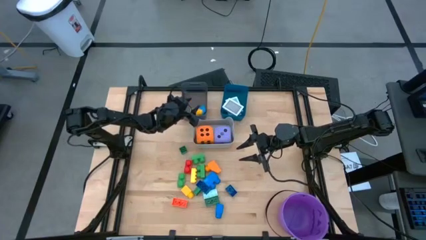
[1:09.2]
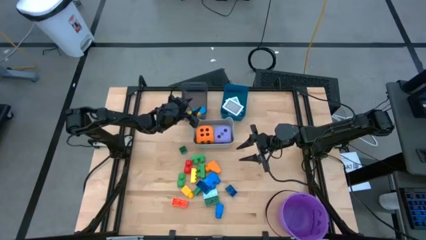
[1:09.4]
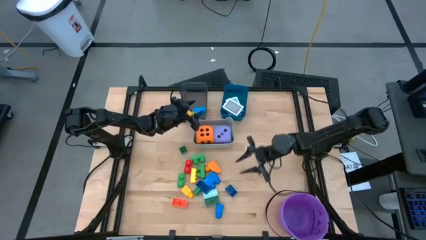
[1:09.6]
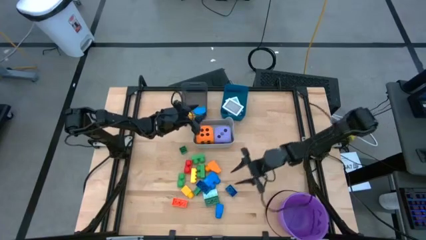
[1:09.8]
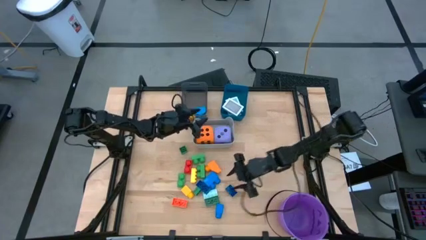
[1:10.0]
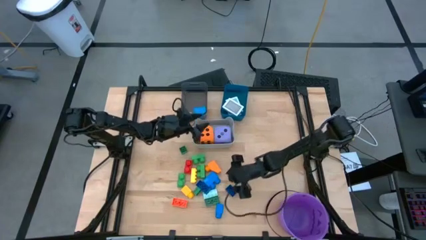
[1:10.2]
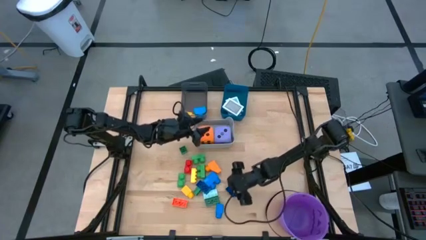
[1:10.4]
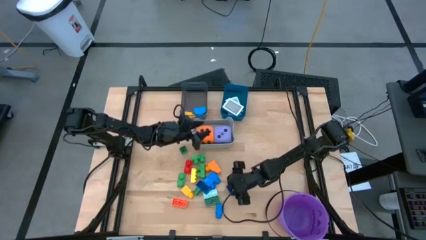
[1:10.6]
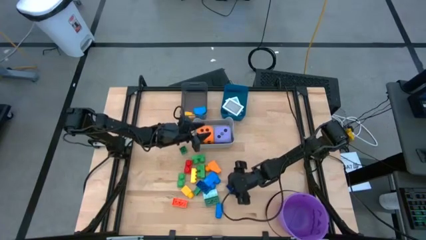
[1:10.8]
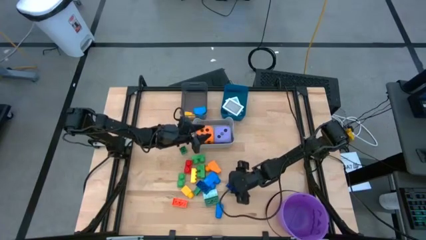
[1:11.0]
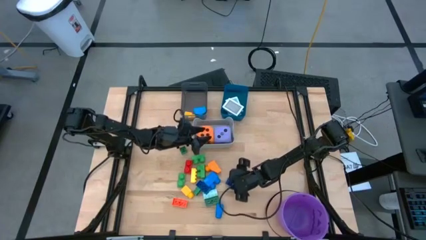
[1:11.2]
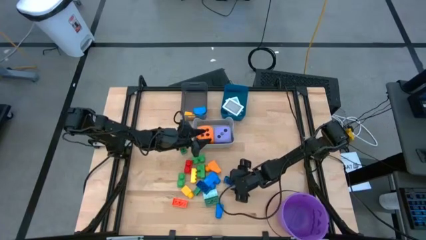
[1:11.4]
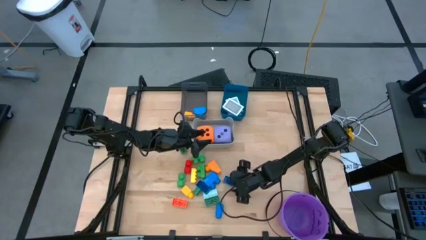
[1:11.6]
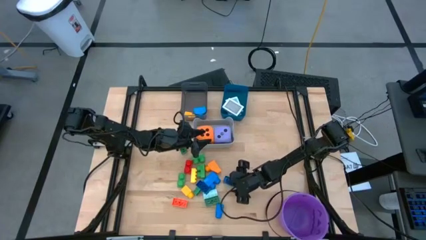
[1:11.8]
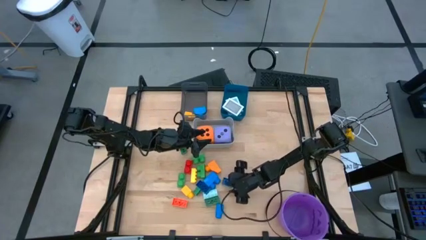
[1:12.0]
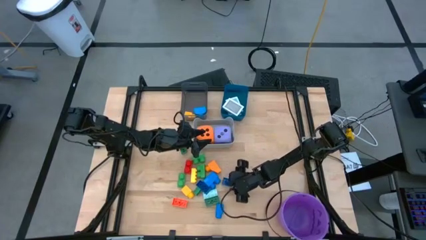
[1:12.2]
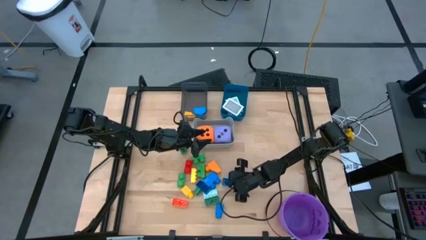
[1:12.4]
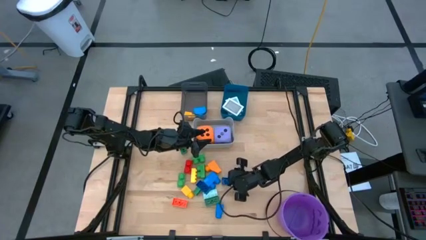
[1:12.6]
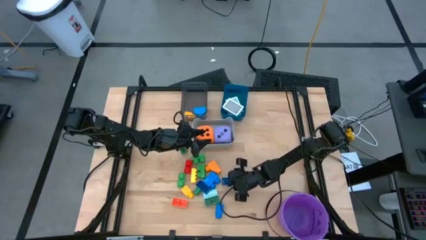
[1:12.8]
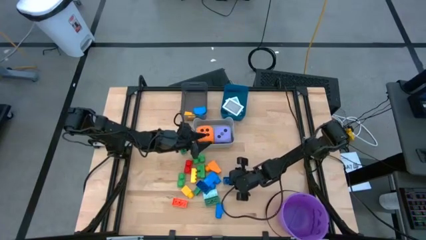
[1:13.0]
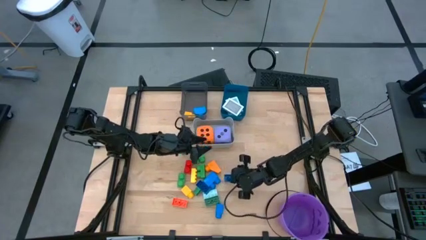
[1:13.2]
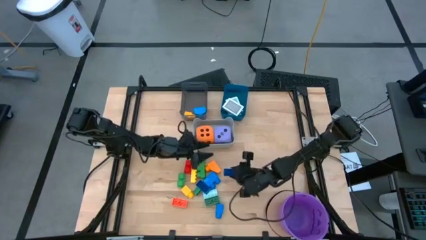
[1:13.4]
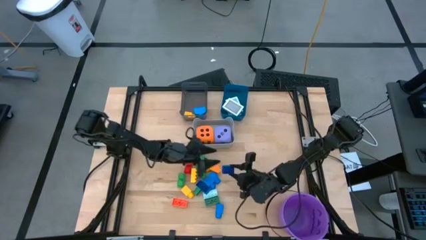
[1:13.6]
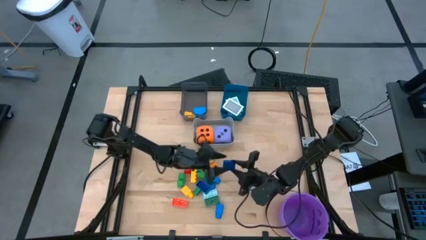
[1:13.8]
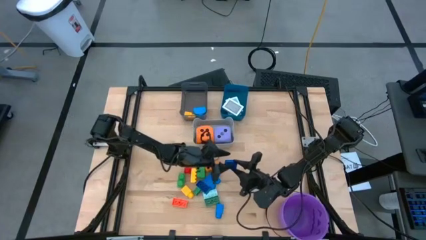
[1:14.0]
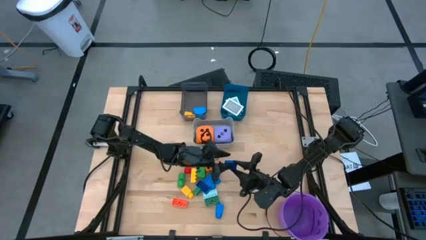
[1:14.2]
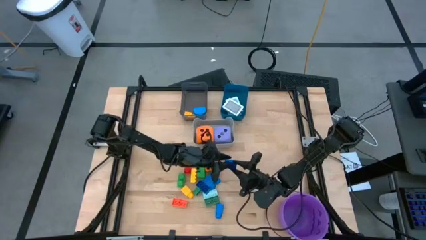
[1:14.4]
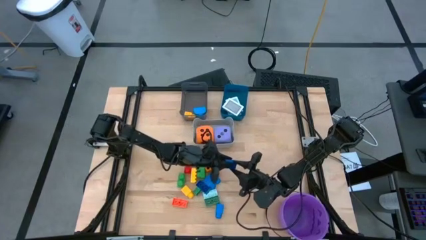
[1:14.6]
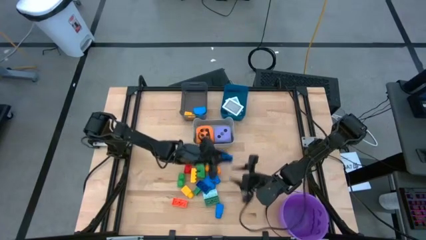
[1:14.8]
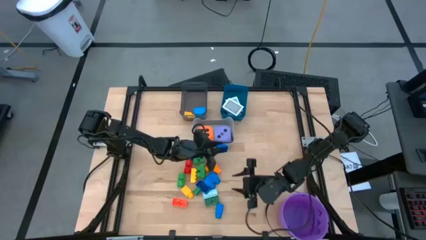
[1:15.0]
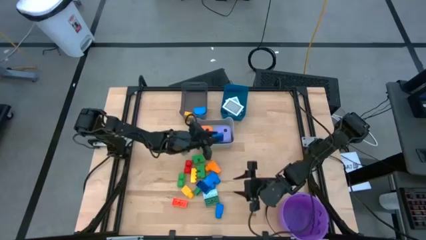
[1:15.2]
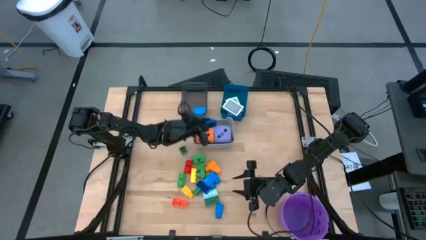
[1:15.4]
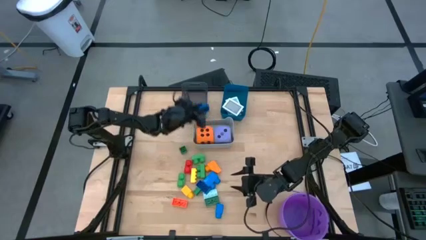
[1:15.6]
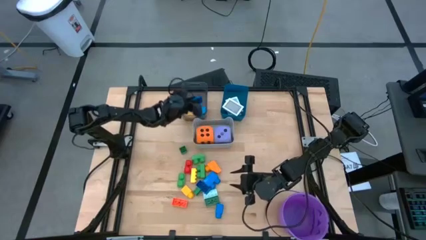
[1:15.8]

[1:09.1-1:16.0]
Task: Pick & Place Toys
Put the right dark blue game piece into the black bin

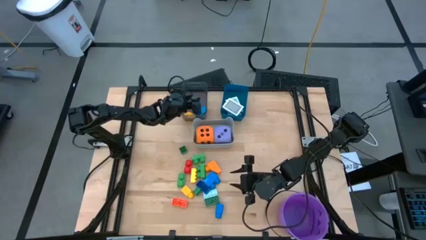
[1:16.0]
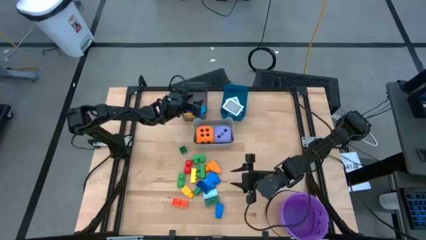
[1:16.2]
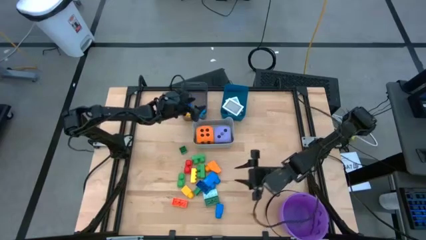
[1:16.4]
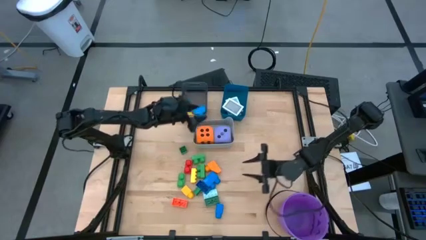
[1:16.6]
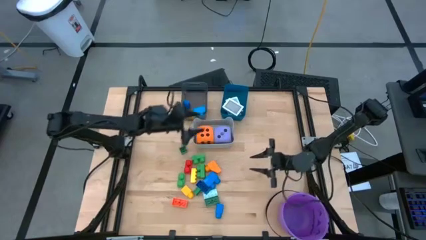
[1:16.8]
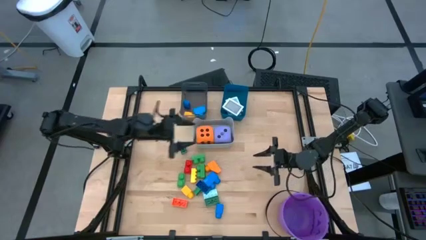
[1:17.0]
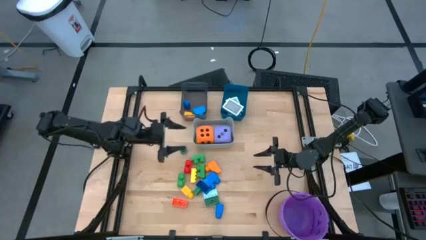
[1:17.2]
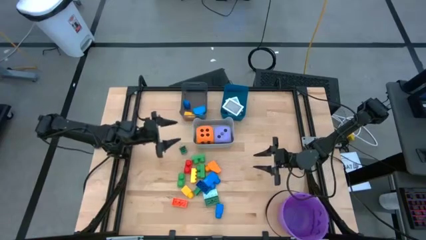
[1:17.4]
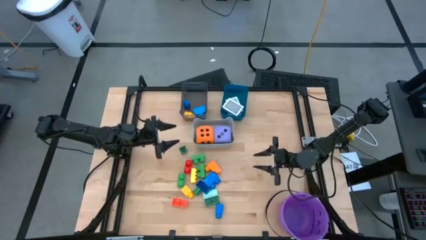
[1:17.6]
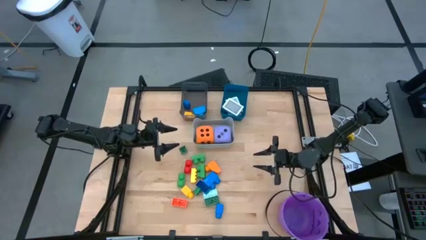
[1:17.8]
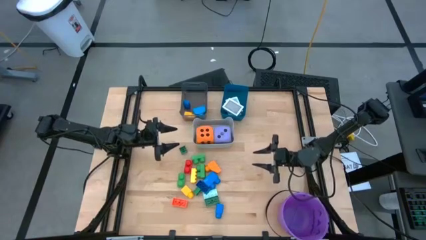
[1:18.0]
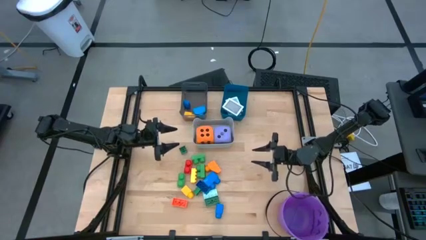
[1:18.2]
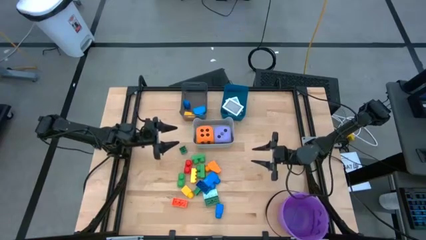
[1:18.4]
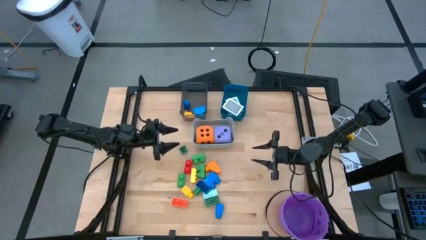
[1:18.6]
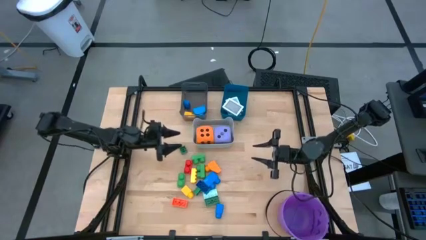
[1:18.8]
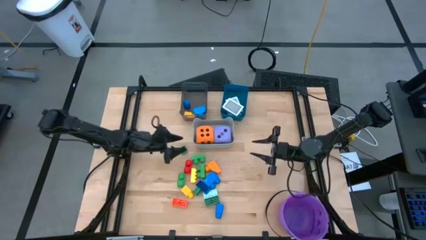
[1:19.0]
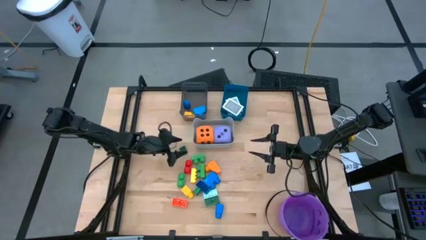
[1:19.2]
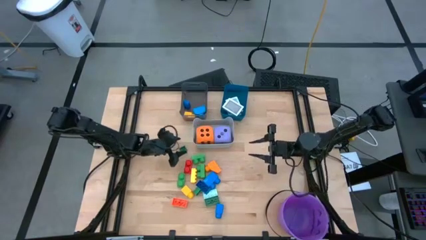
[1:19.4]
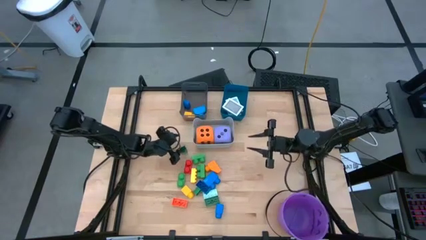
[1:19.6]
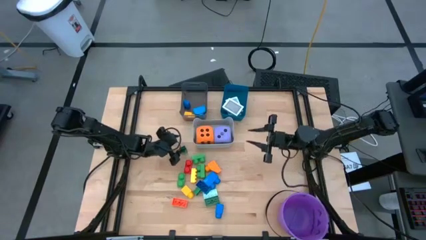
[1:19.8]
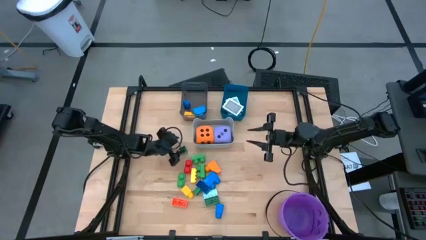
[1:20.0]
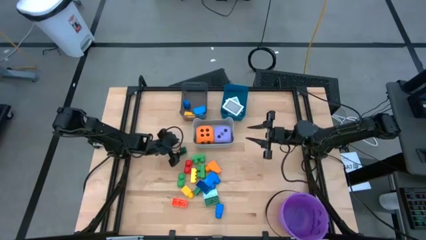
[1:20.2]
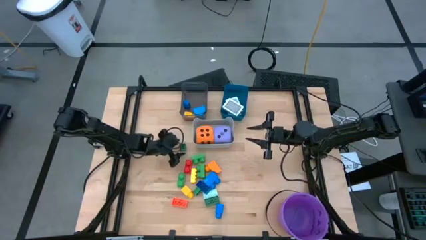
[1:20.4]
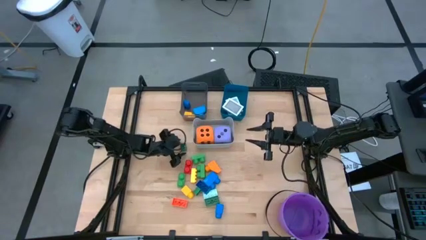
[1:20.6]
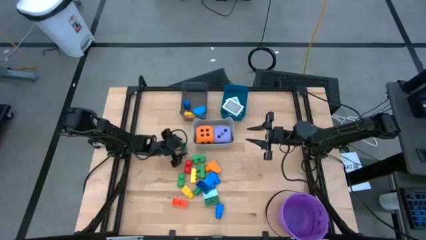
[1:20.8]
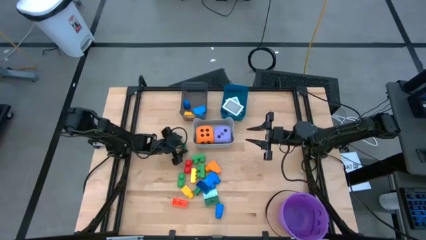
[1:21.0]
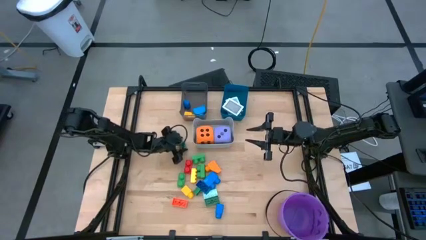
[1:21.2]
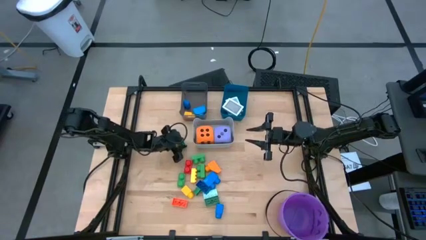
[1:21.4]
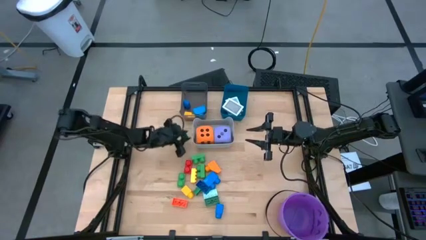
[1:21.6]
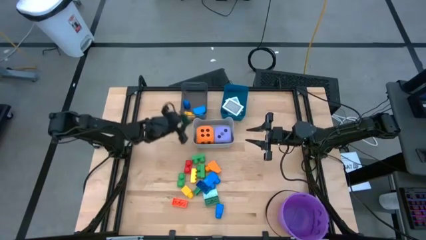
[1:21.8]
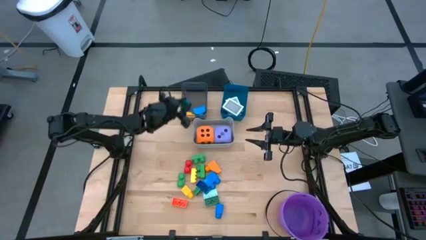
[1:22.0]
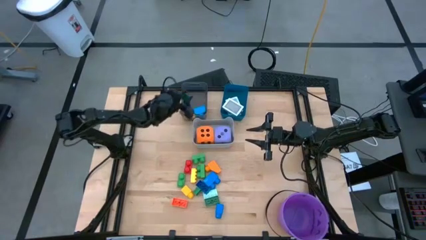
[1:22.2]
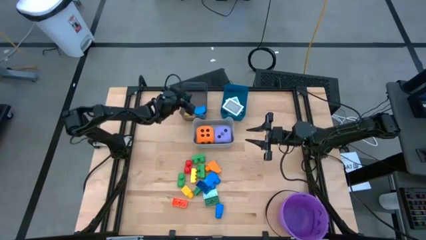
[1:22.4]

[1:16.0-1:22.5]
Put the top dark green game piece into the black bin
